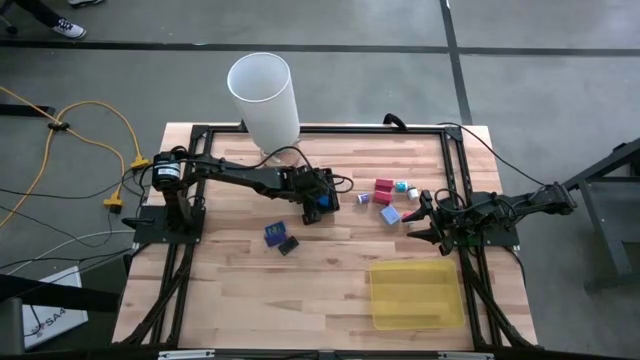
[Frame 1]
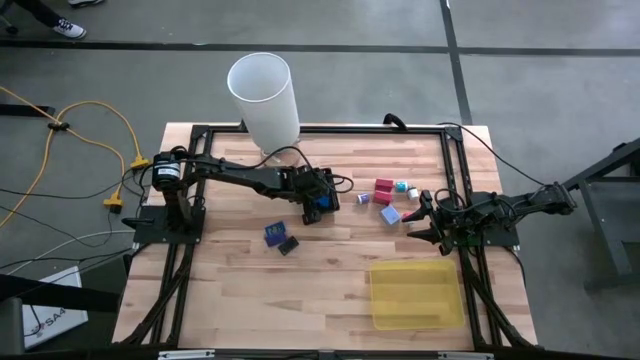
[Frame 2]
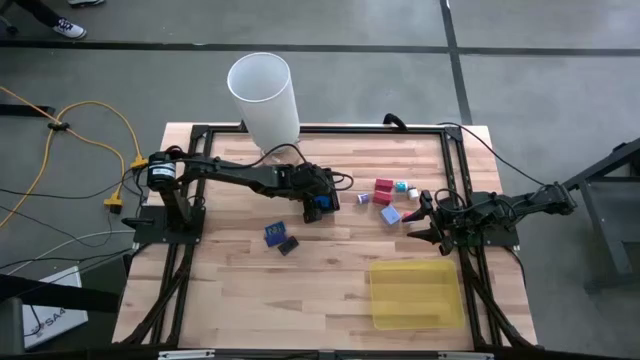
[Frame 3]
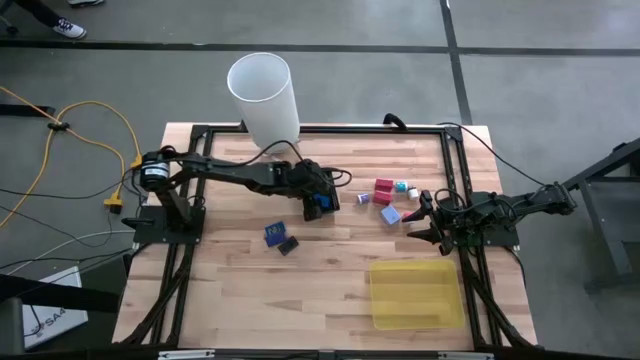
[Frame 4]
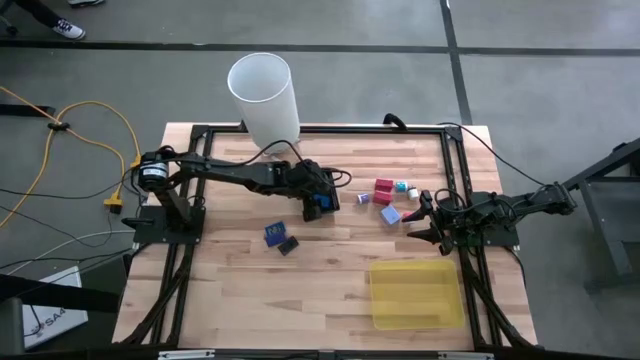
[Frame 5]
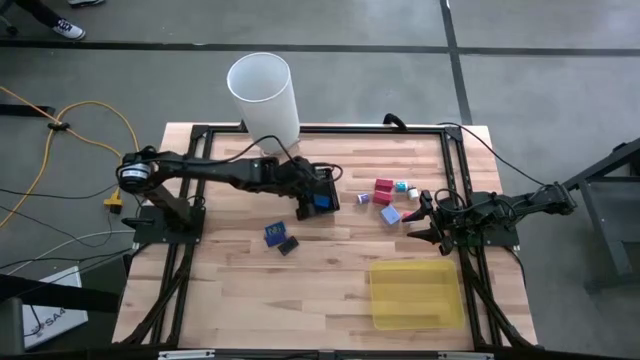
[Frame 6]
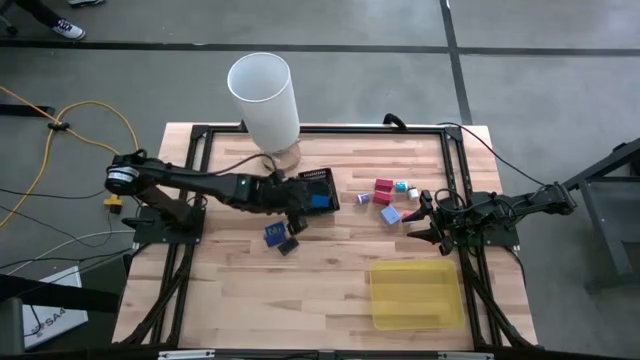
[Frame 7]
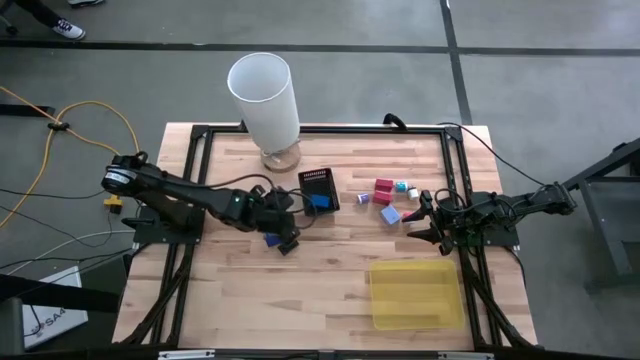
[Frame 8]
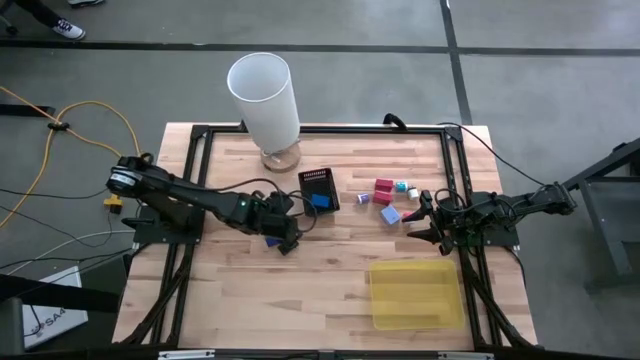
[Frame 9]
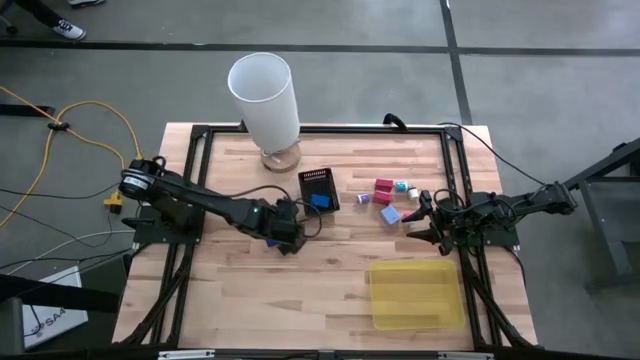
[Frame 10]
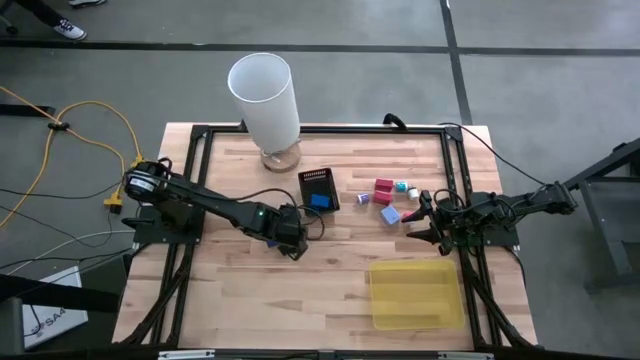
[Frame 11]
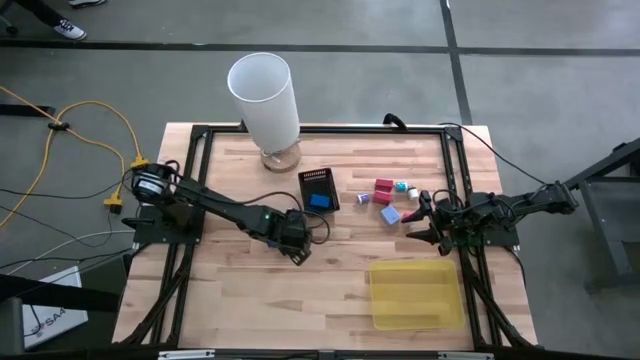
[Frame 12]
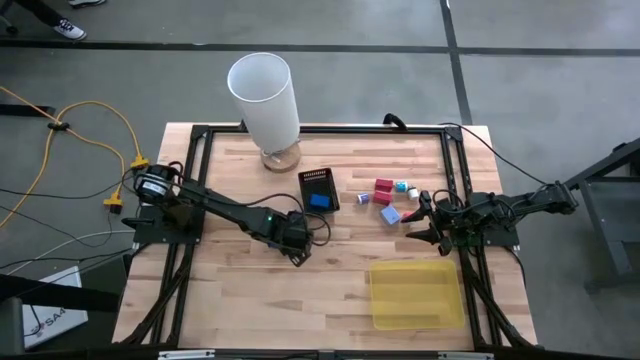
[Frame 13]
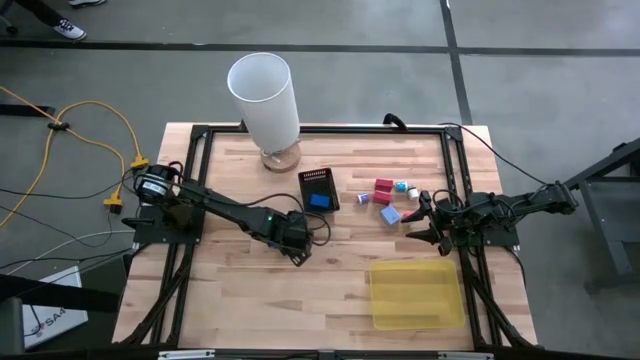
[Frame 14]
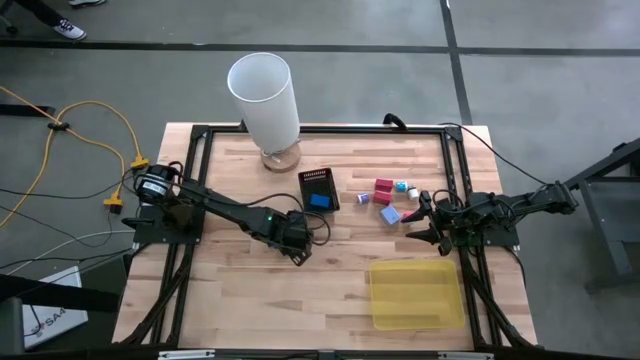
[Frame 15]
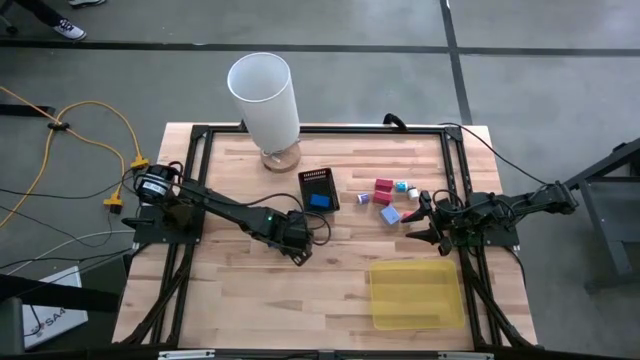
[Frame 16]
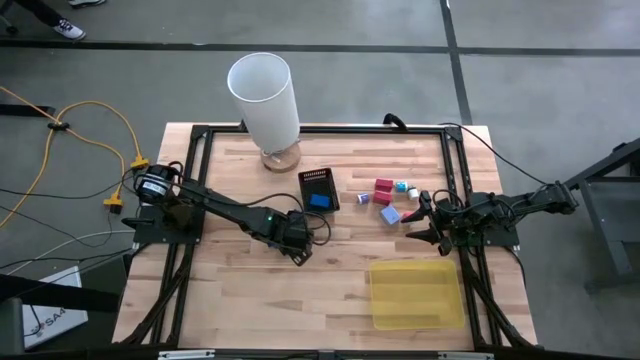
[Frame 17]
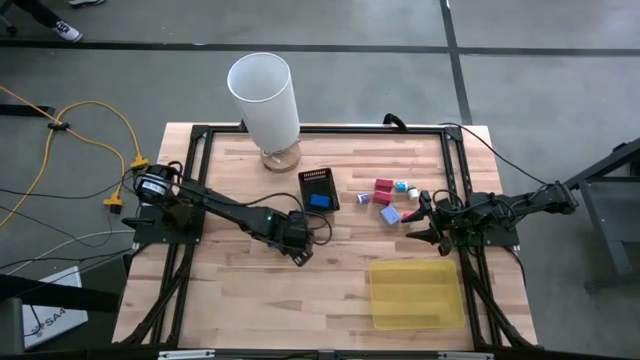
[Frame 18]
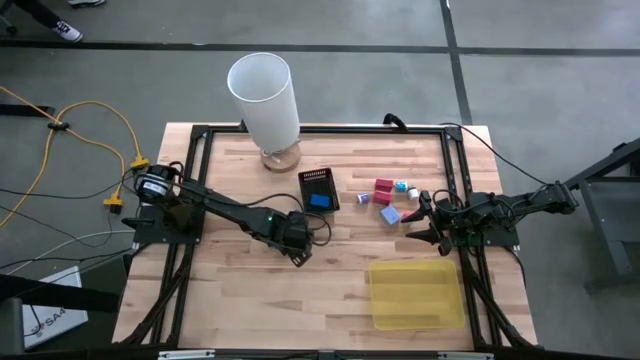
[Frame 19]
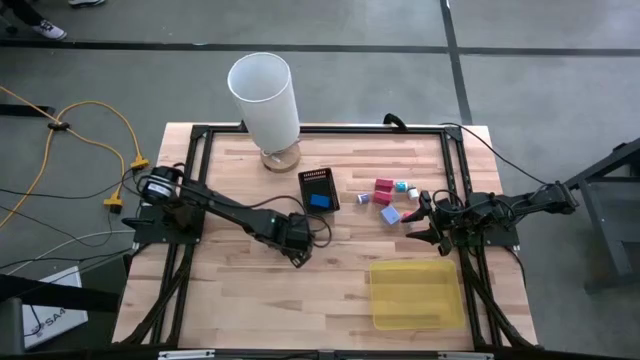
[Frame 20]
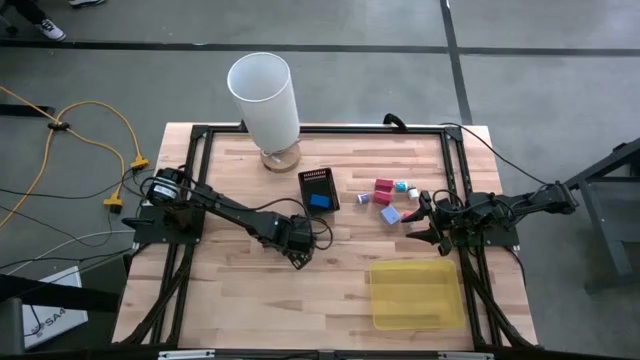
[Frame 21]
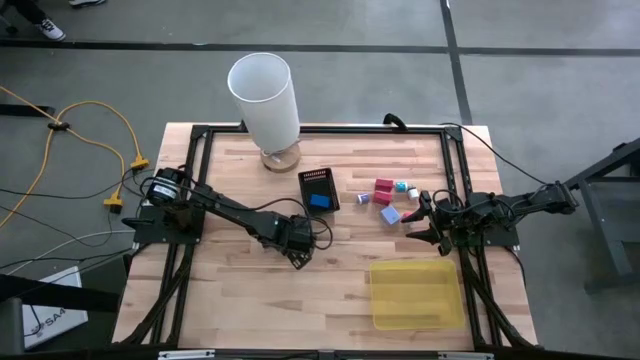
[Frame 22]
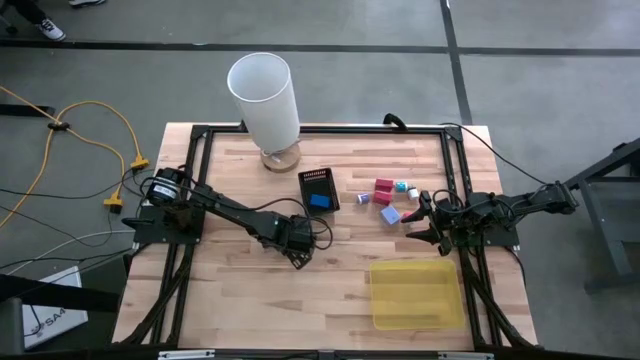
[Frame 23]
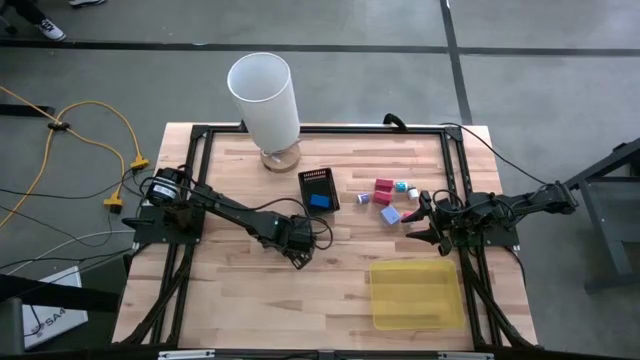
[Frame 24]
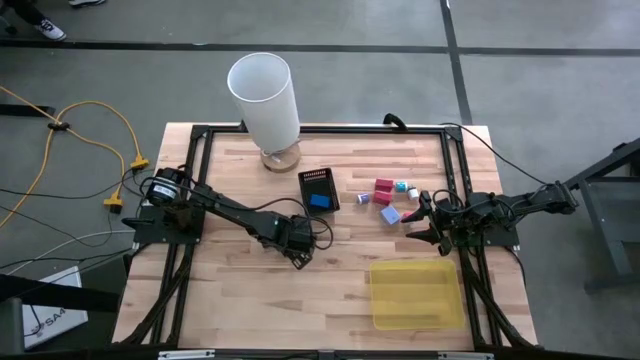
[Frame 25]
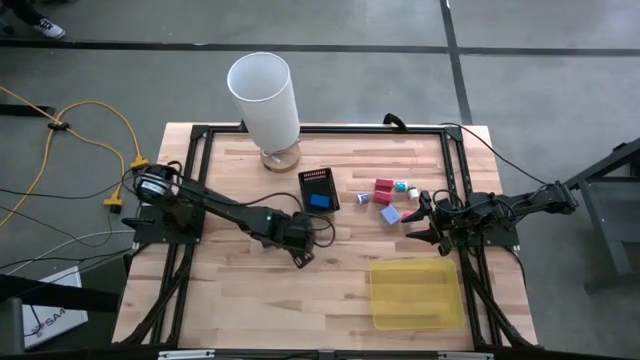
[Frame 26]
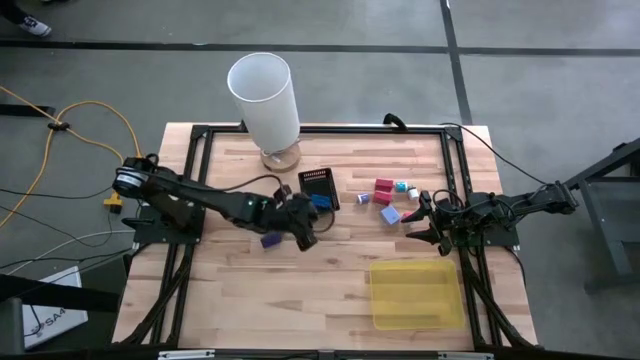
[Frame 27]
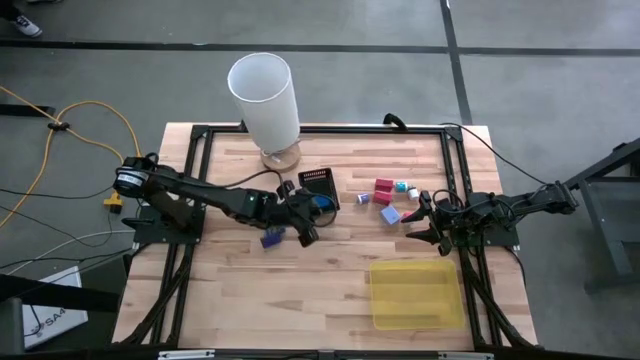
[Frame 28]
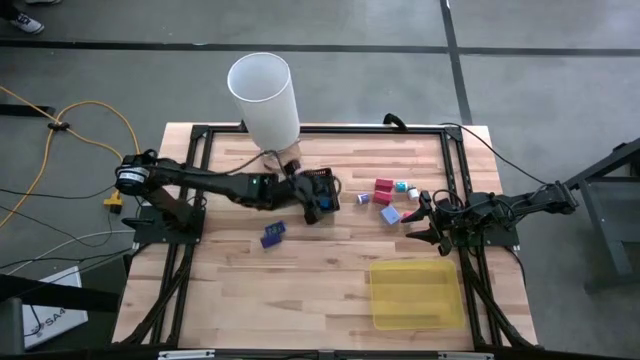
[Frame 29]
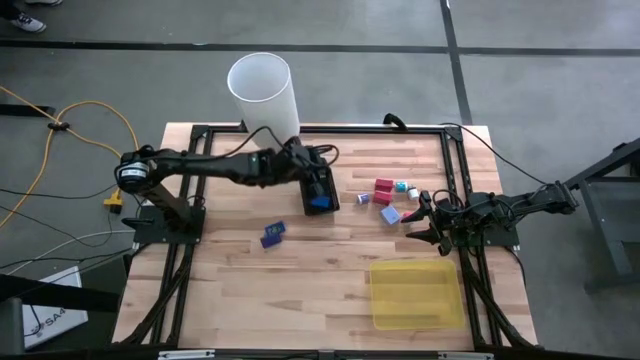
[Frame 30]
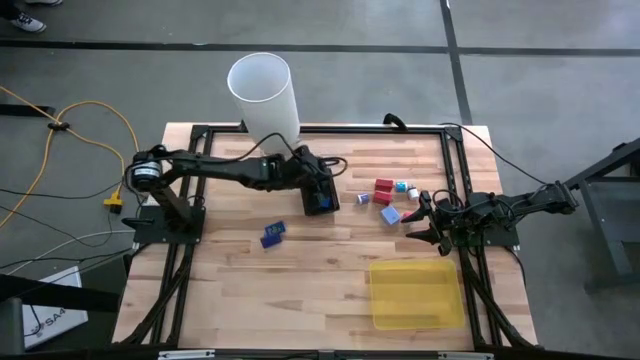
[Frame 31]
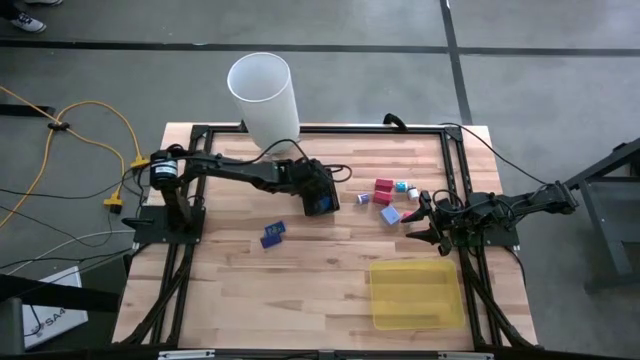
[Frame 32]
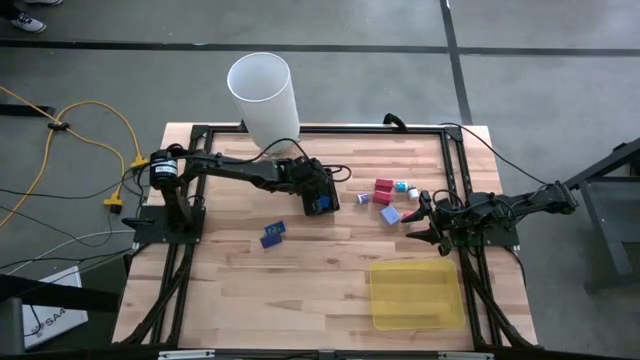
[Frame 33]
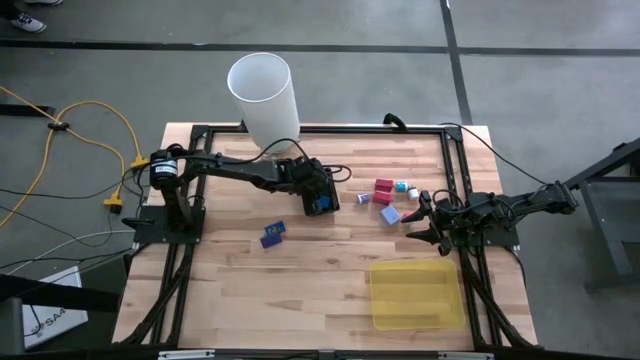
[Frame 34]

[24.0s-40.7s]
Task: Pick & Place Office items
Put the black digital timer into the black bin

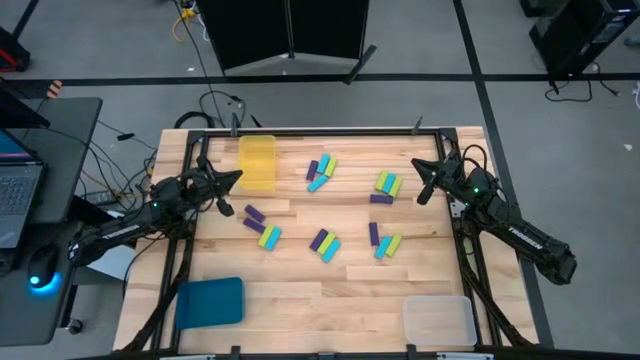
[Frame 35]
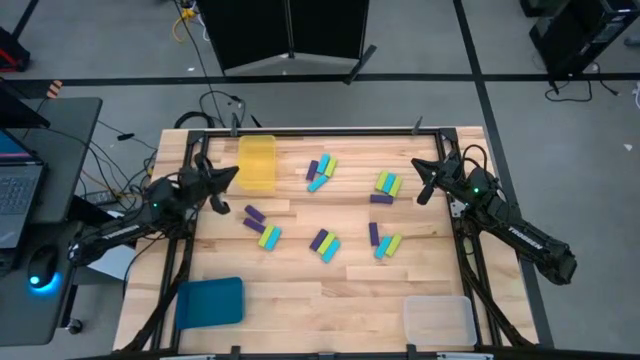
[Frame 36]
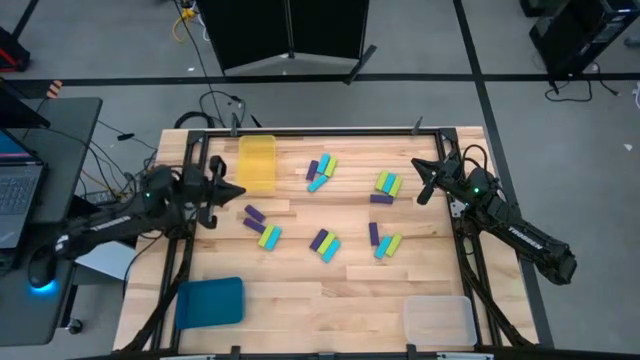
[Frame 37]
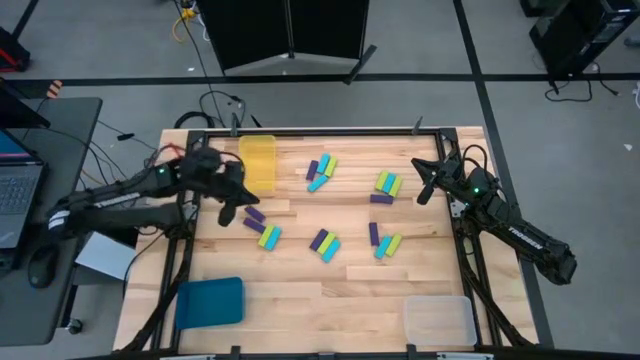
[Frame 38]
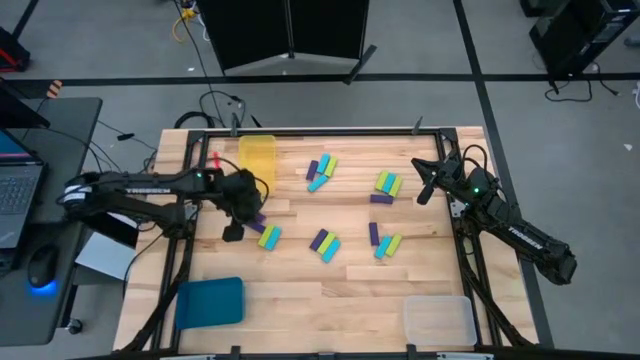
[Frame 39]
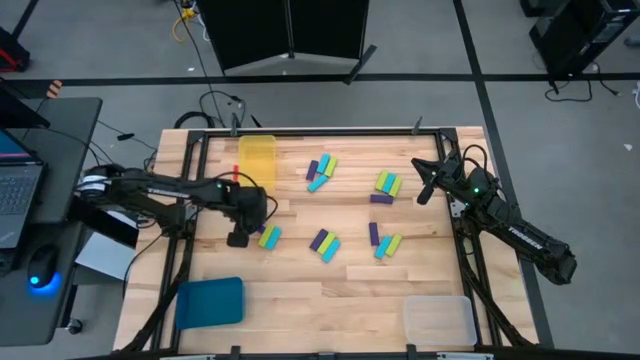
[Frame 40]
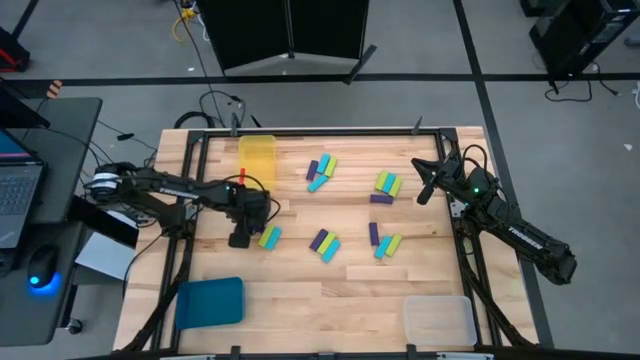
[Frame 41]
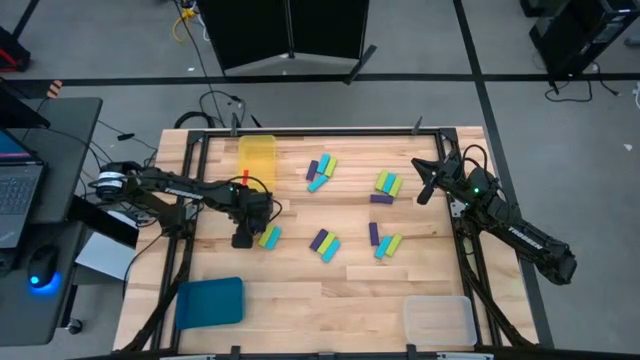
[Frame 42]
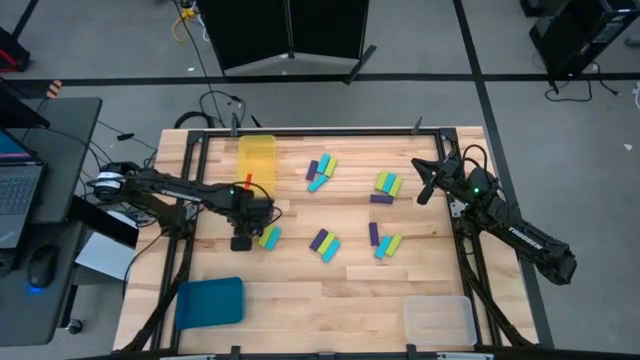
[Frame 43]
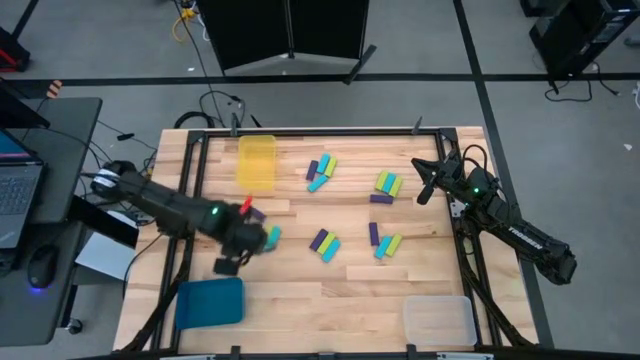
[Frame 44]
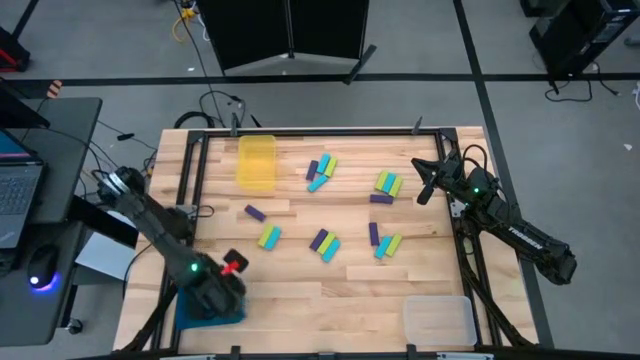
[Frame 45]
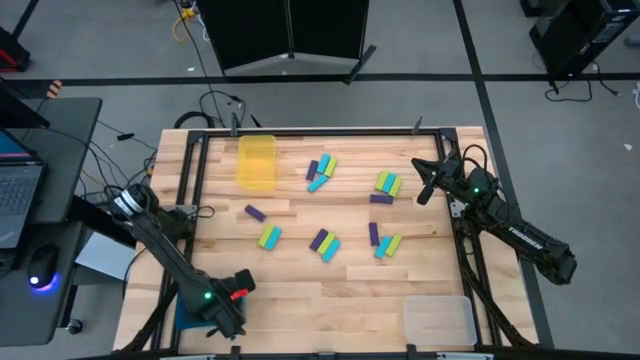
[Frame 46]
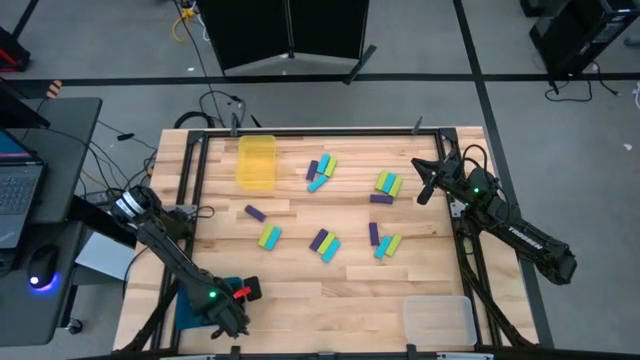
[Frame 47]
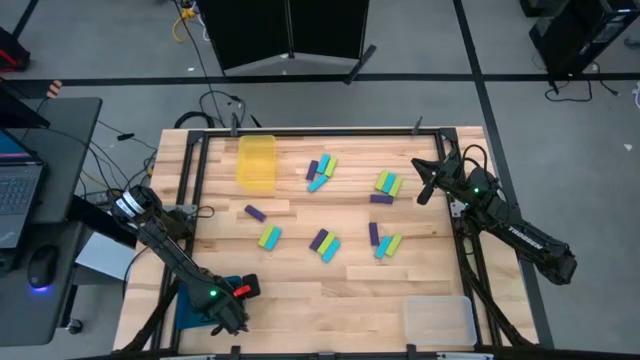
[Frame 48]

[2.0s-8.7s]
Task: Sort blocks
Put the purple block into the blue bin
